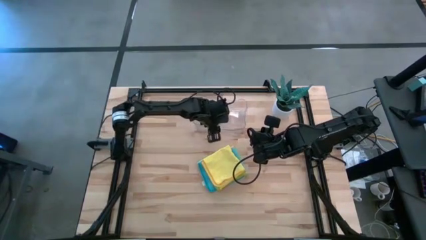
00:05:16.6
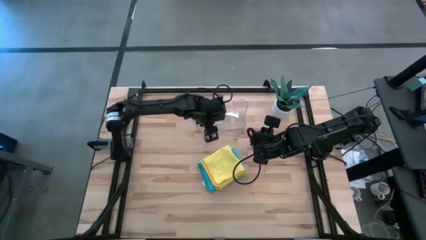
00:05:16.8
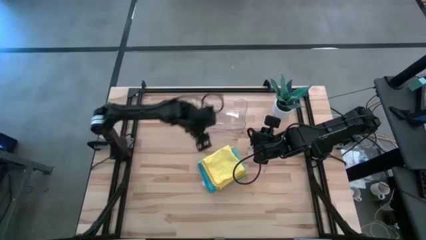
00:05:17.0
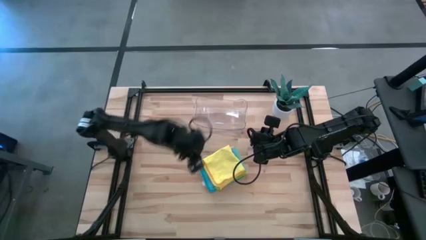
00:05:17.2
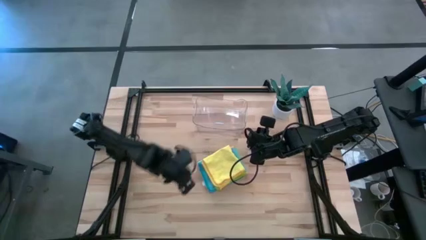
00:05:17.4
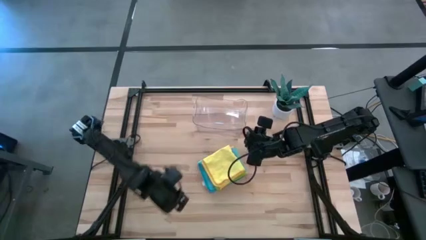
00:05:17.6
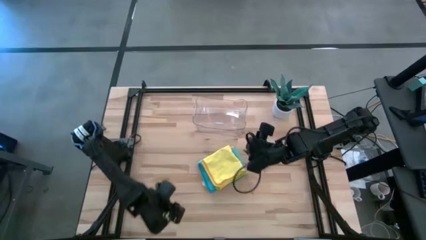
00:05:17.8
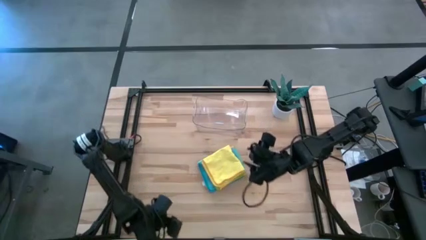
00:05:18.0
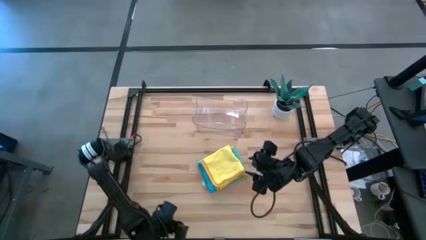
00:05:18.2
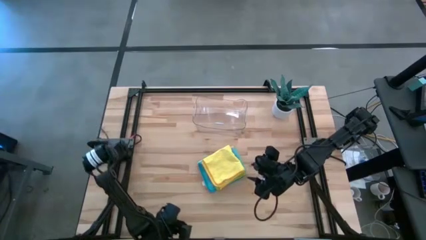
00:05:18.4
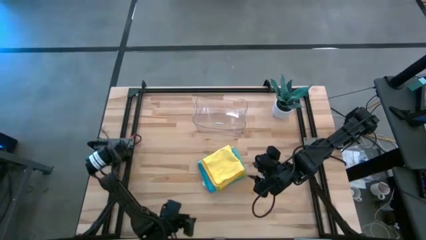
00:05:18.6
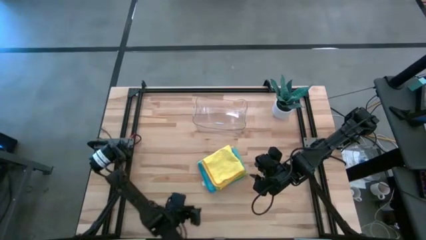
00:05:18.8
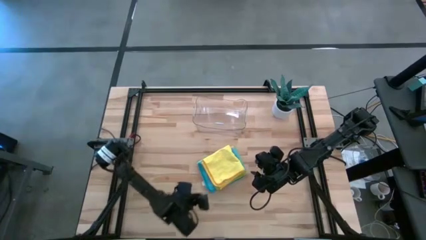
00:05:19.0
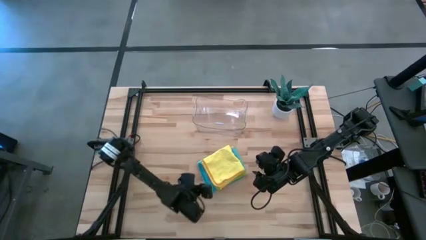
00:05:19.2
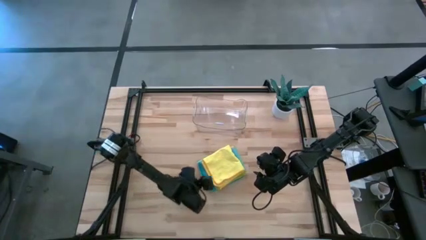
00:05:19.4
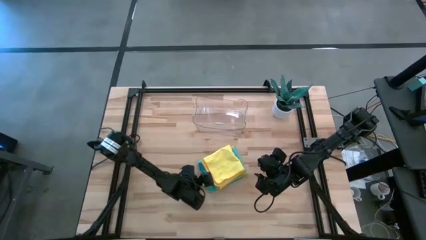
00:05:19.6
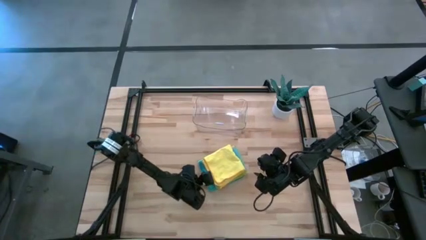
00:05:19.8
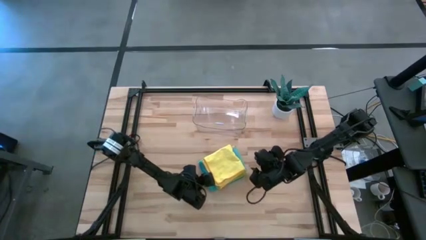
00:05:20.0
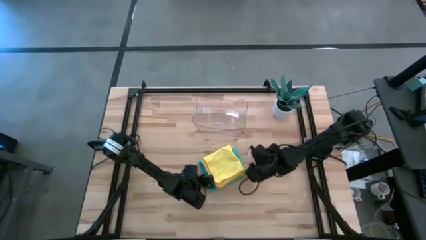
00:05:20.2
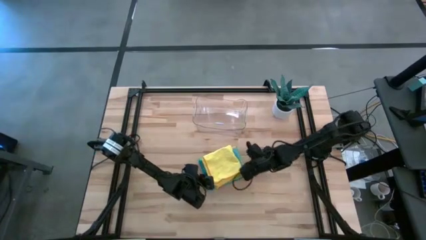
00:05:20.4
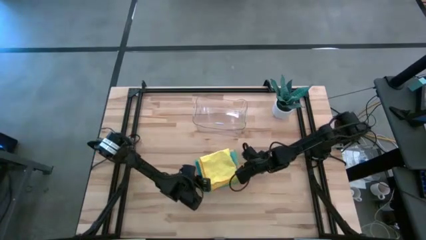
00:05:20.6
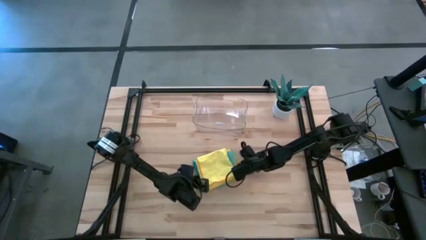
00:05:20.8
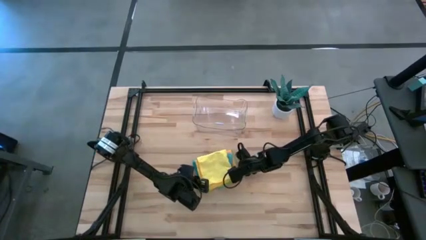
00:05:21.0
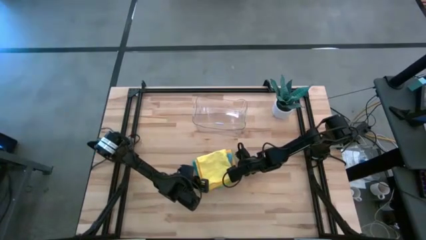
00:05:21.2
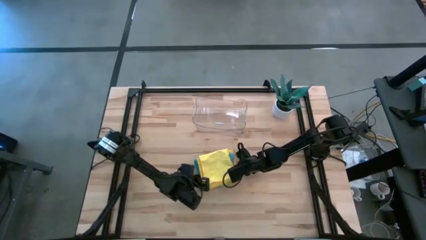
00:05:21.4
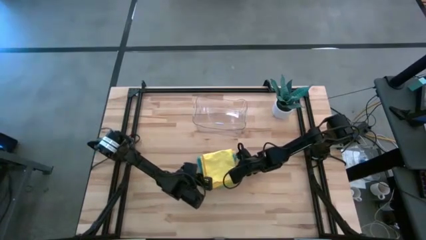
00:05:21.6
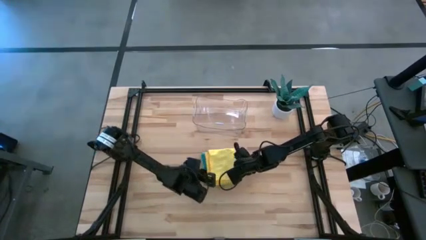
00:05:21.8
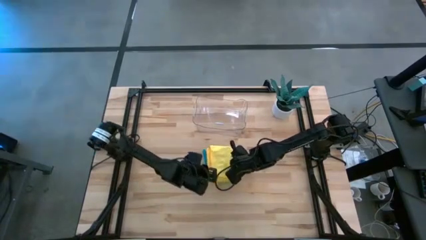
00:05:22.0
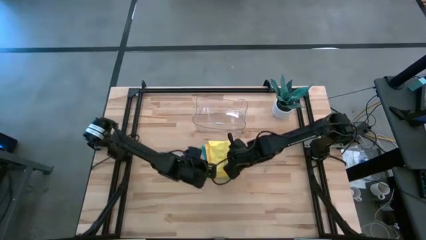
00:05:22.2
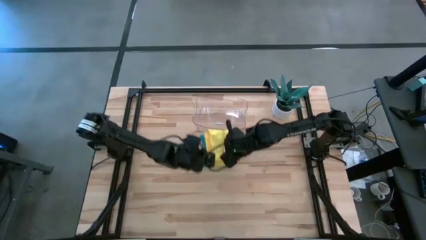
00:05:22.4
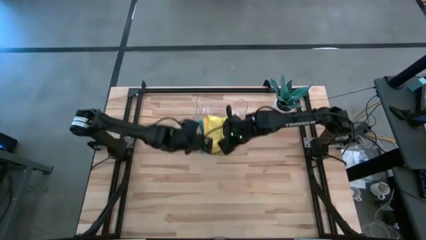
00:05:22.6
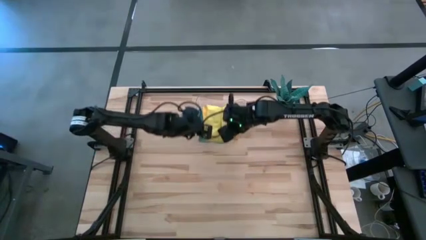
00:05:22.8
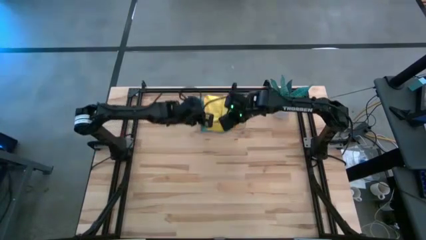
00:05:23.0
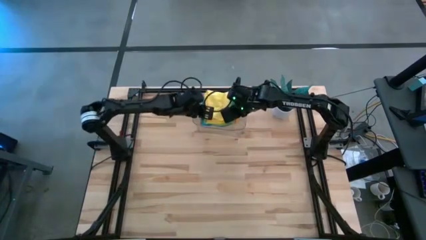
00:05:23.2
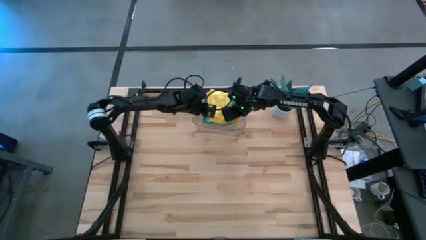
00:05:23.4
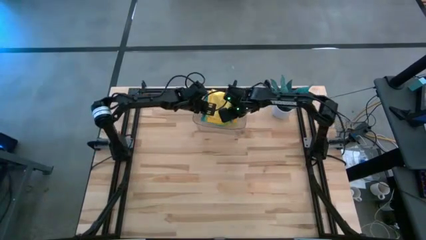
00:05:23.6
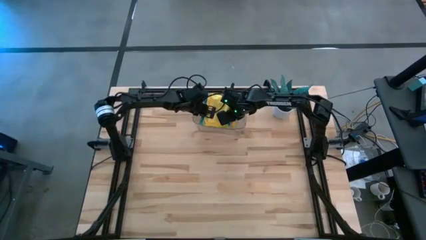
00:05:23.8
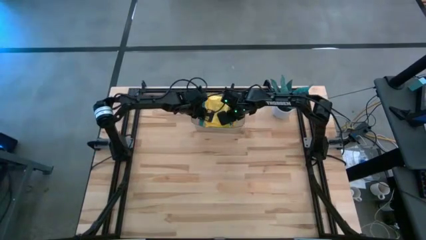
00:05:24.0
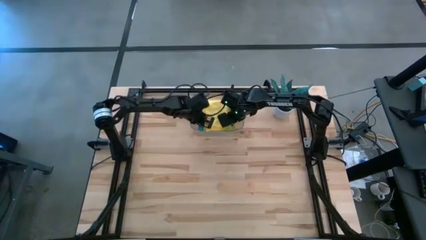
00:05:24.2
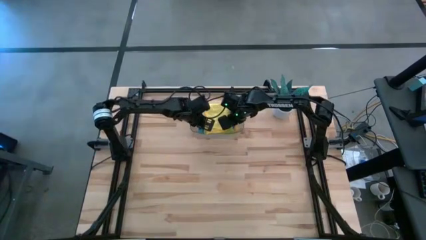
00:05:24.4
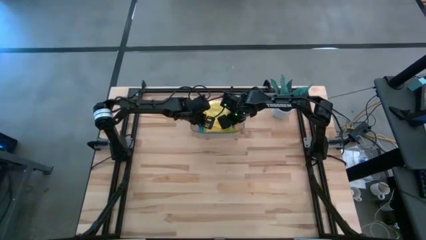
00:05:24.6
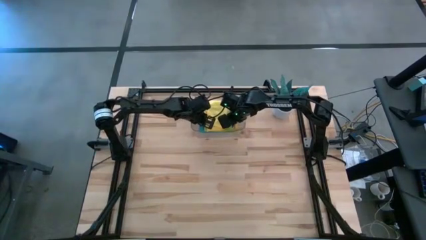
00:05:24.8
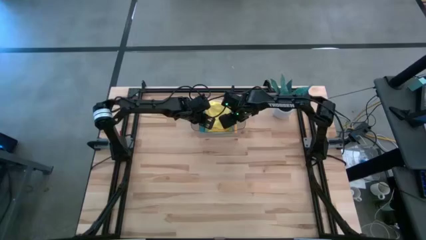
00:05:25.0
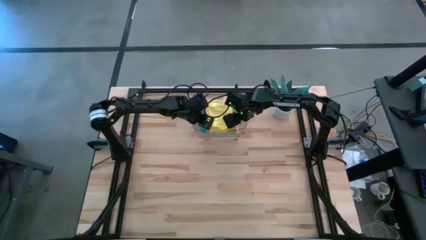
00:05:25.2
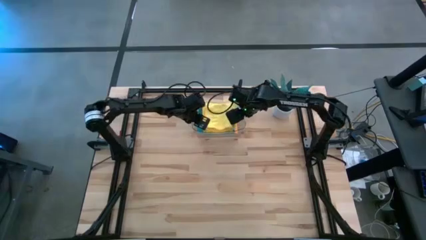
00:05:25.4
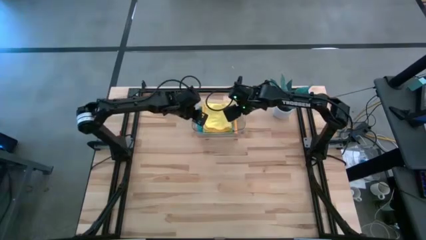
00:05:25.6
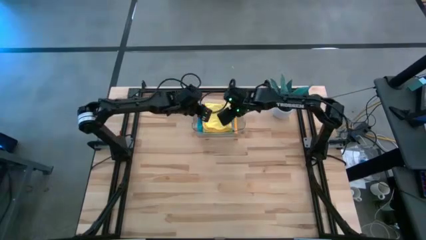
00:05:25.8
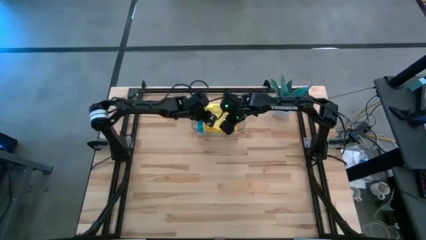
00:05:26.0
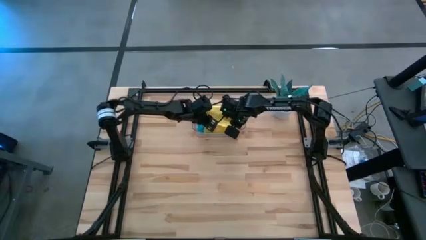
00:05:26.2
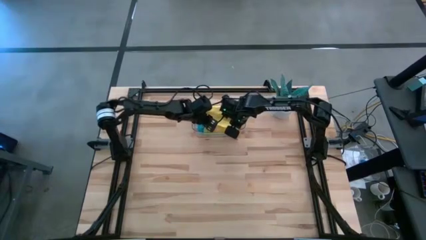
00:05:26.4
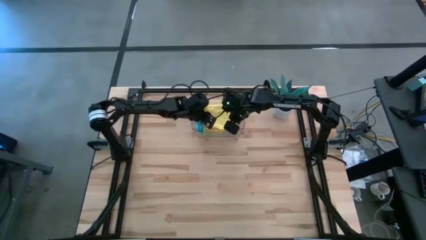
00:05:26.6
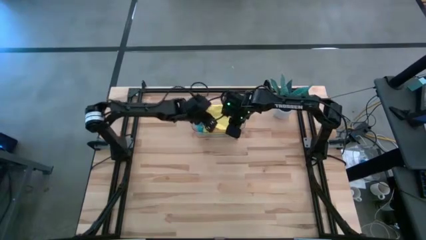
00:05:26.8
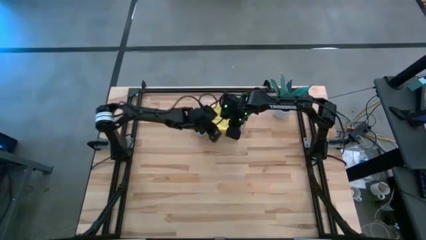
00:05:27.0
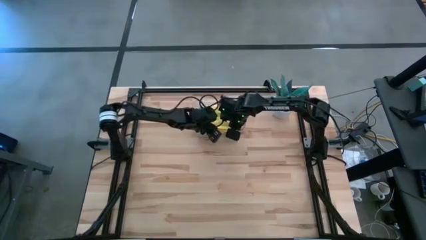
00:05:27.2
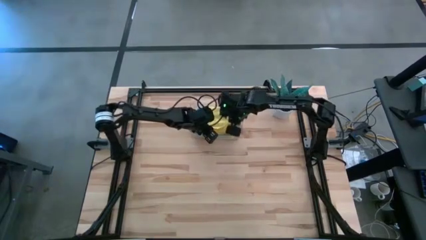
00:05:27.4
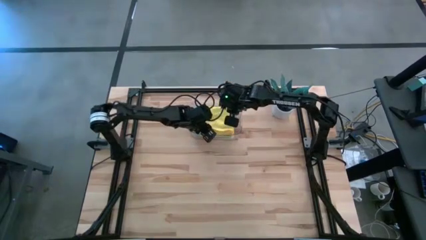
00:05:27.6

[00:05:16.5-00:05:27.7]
Task: Fold microfiber towels
Put the stacked microfiber cloths into the transparent bin

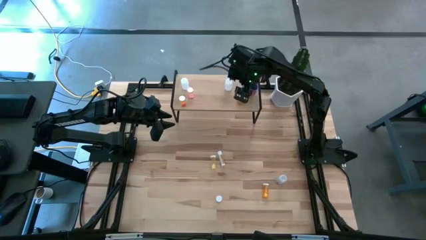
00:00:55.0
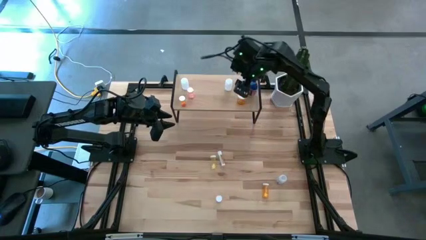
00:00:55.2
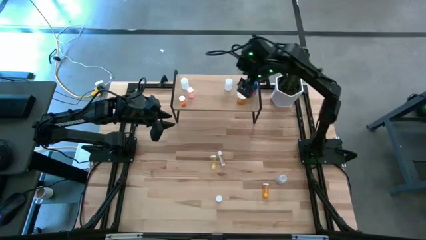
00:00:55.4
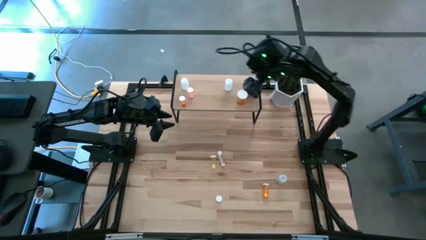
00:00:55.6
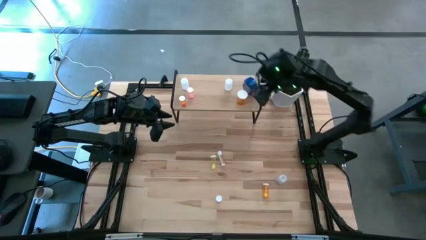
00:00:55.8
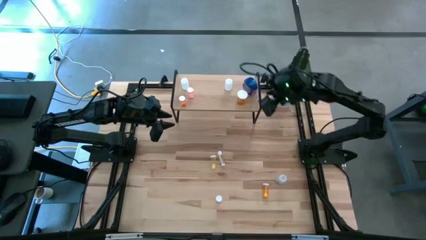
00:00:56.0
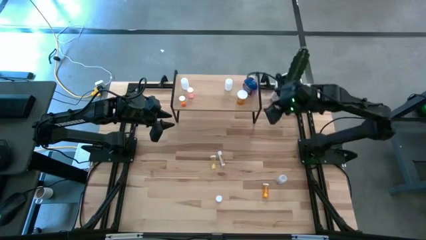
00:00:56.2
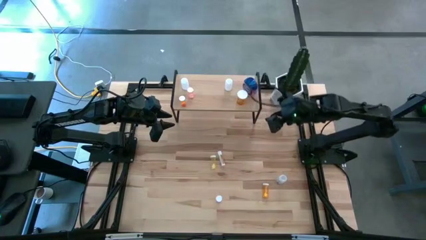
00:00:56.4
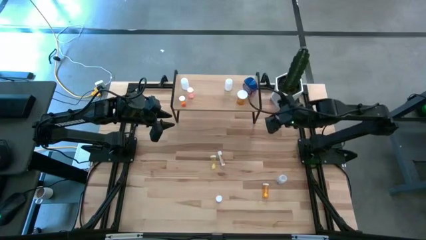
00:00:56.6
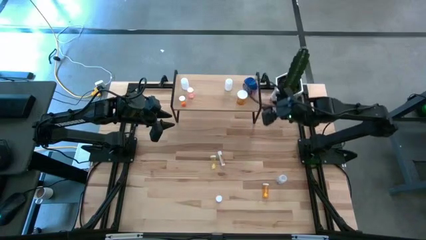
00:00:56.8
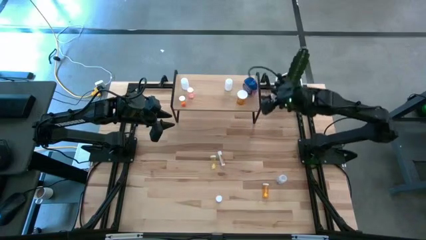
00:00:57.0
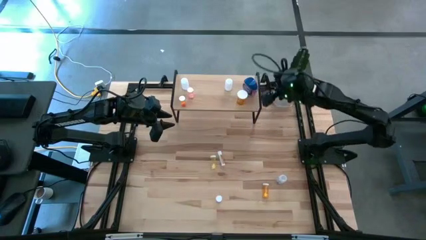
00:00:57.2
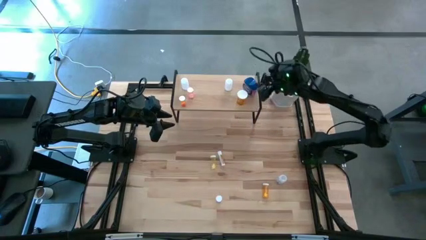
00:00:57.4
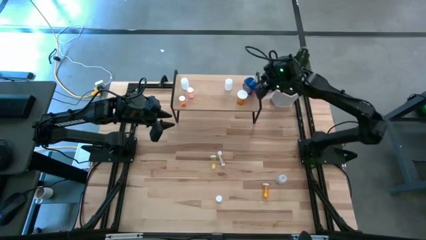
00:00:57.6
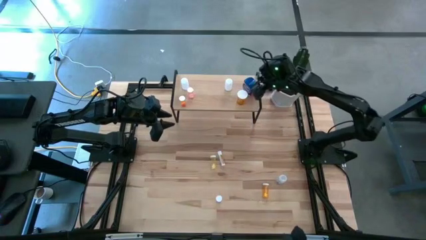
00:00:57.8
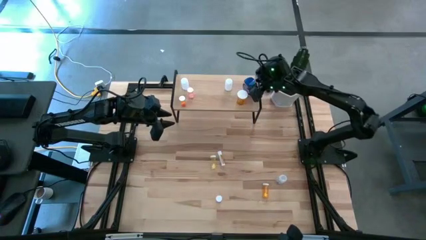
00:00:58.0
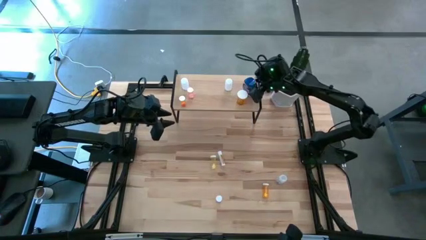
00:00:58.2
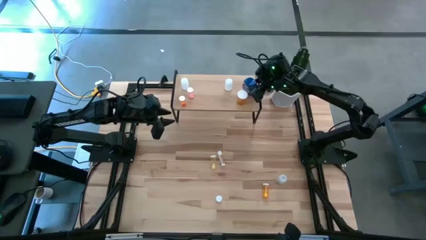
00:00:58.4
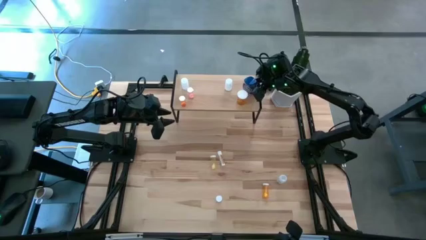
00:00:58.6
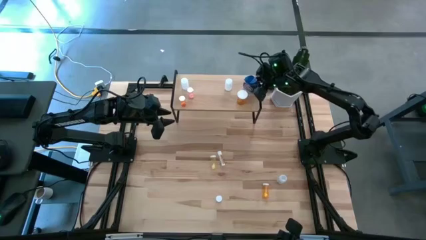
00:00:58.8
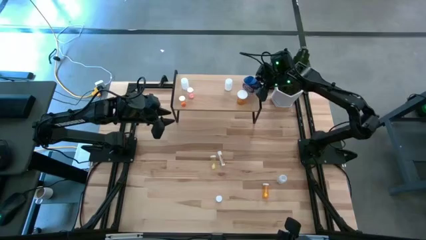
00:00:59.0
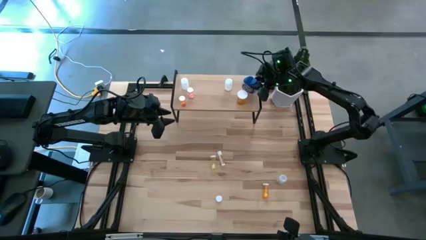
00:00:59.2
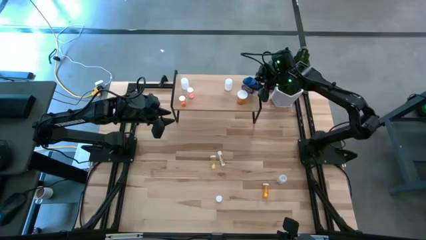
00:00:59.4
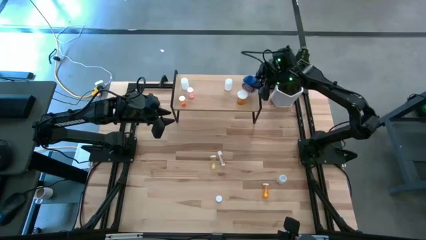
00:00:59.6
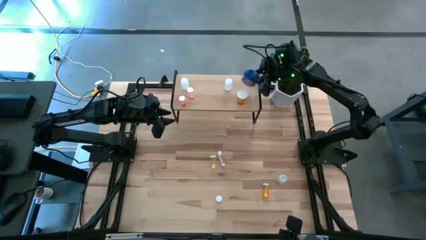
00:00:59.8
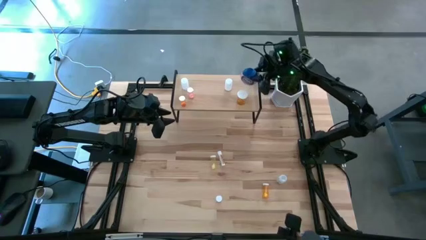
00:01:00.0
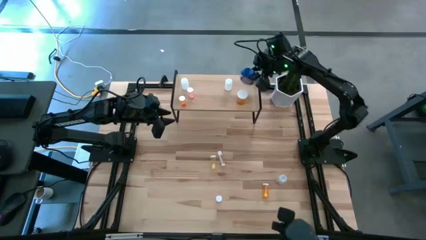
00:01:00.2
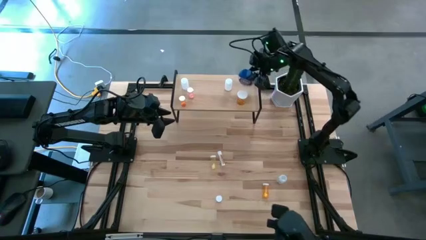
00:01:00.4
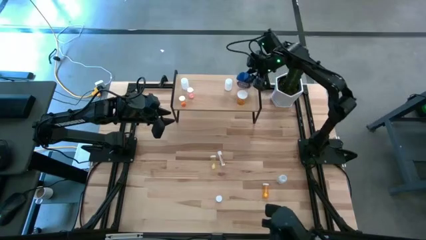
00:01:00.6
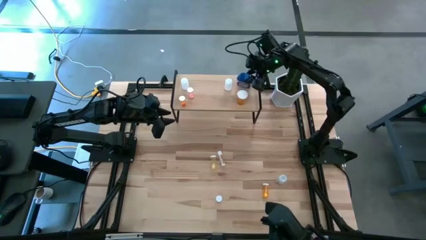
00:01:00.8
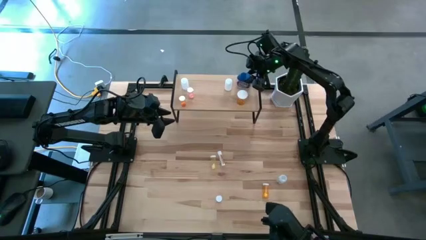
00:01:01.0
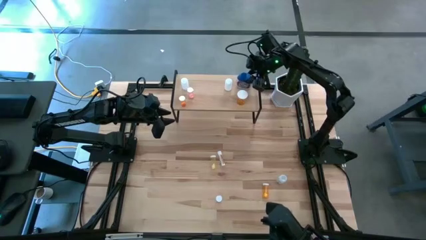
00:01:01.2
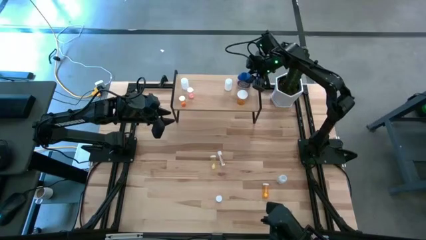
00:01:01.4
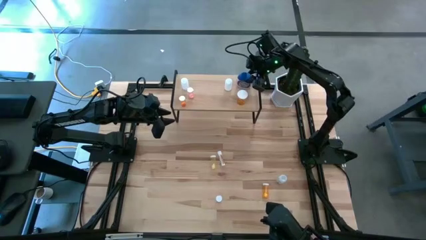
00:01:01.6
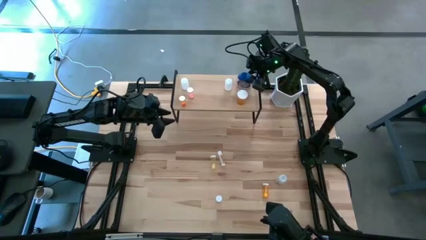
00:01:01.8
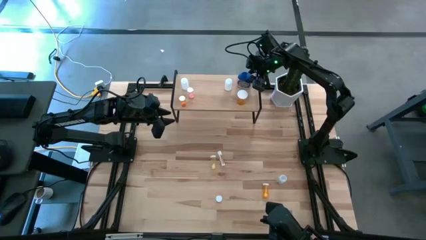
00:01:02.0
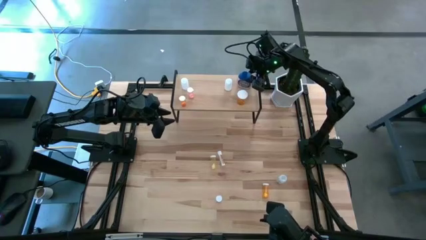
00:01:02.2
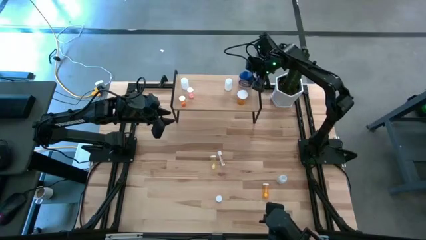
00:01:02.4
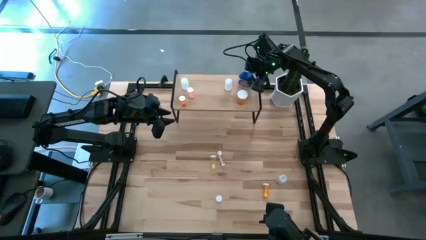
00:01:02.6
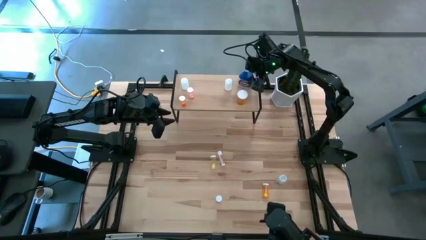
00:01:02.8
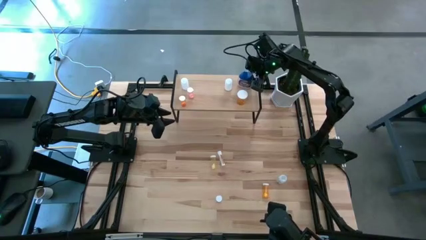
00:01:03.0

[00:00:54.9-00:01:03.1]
Task: Pick and place medicine bottles onto shelf by color
Adjust the blue pill bottle on the shelf
